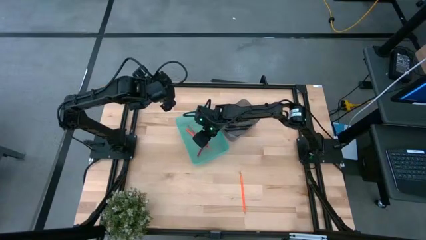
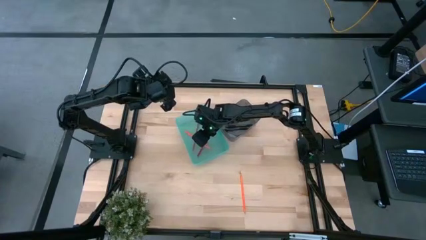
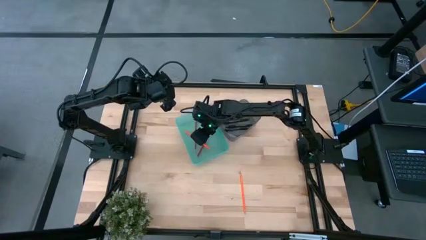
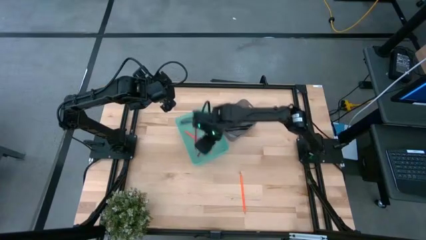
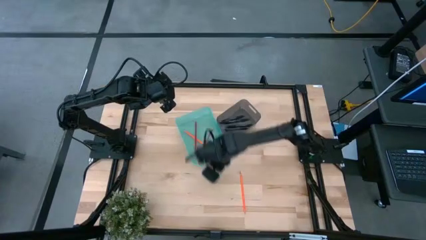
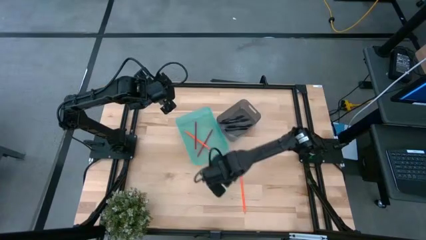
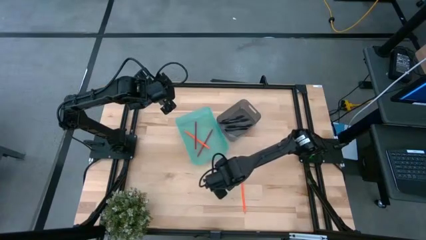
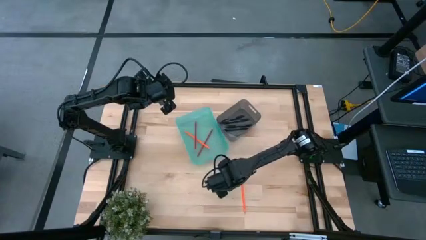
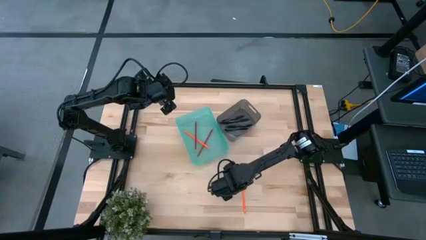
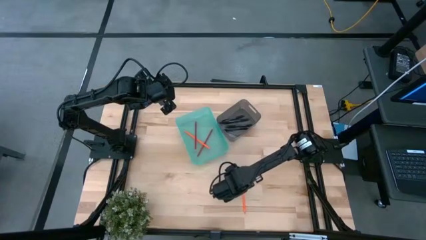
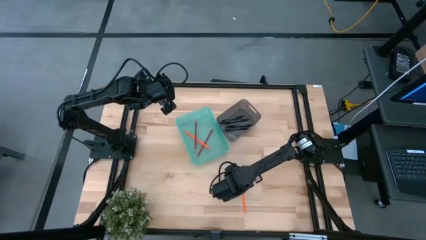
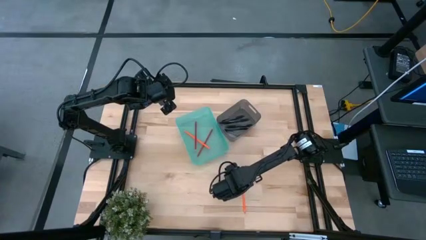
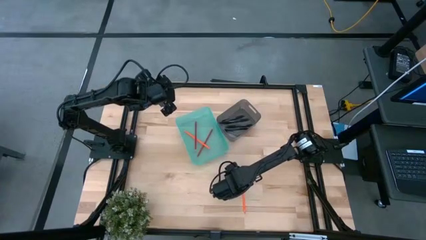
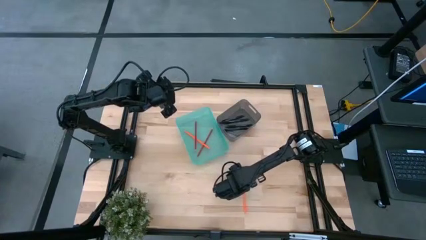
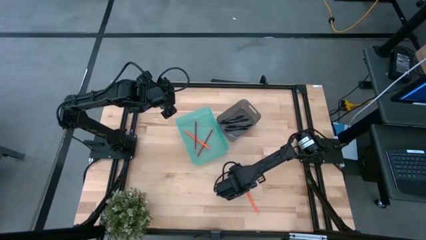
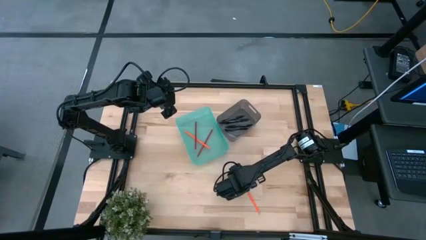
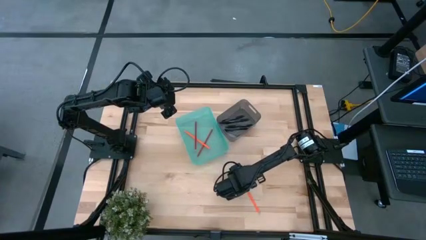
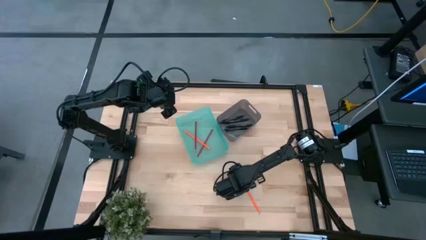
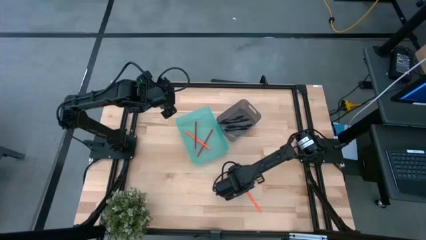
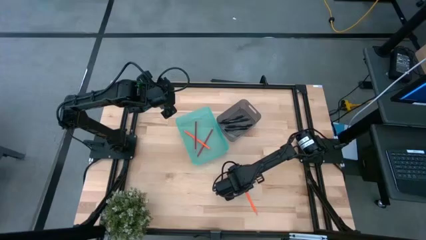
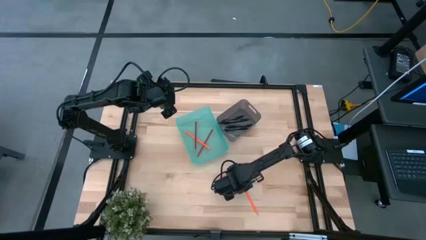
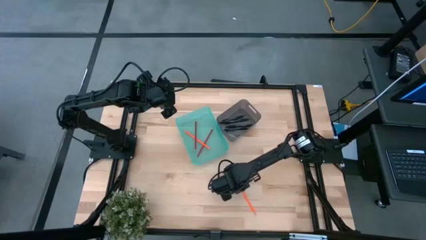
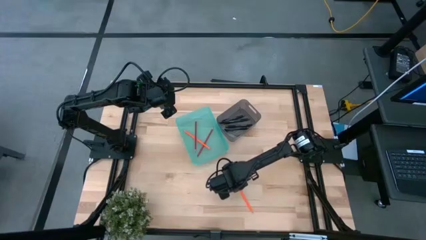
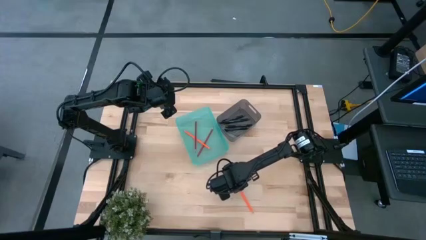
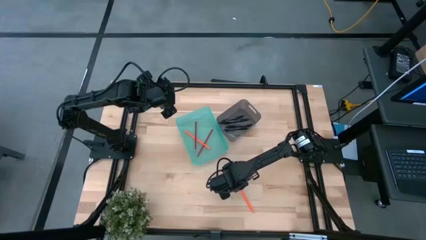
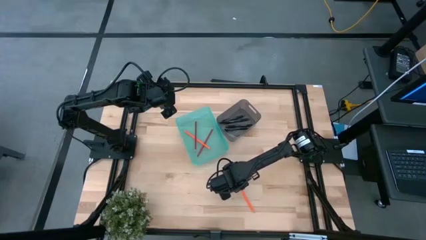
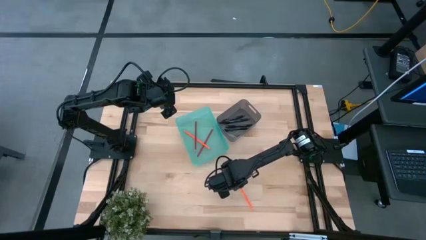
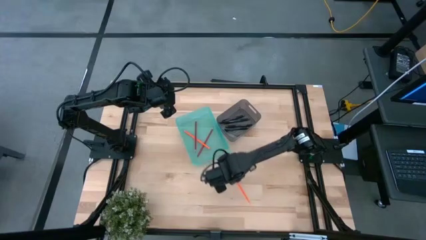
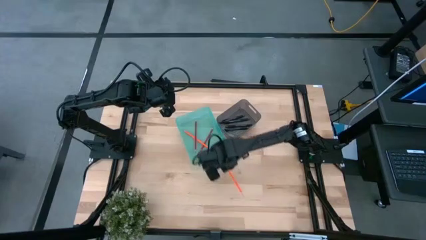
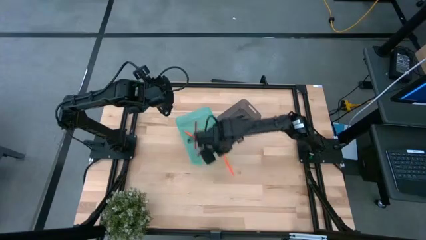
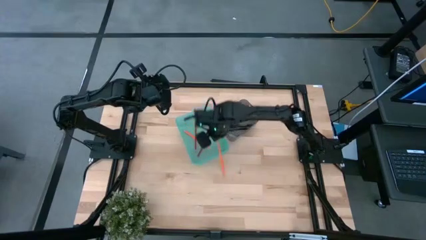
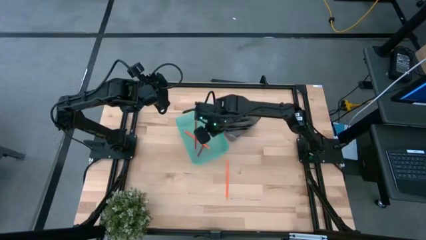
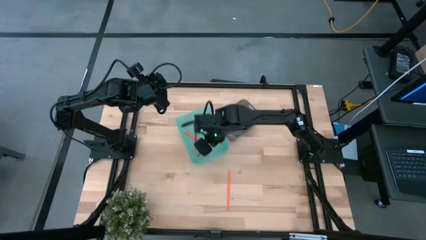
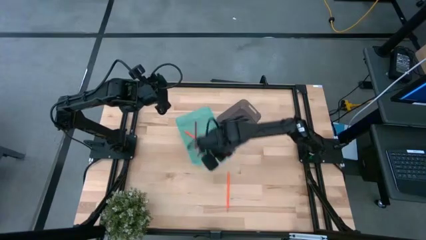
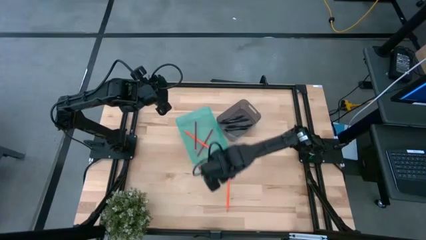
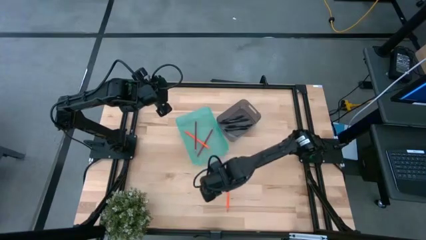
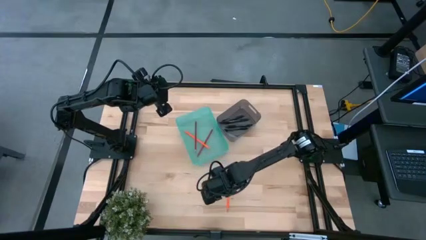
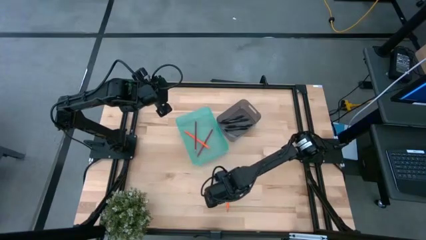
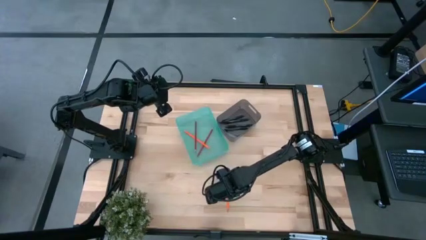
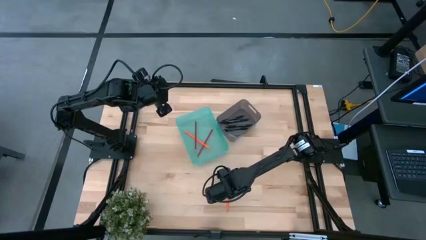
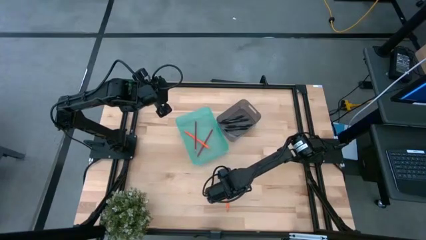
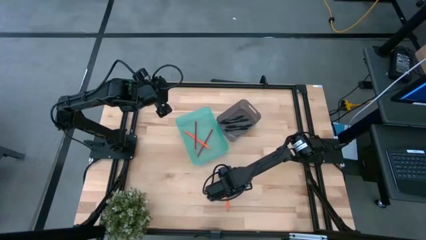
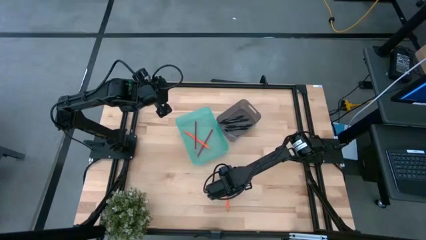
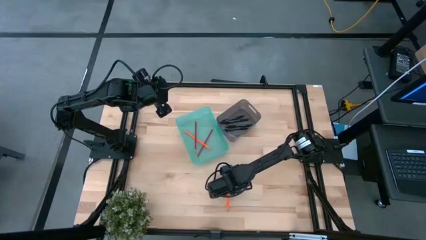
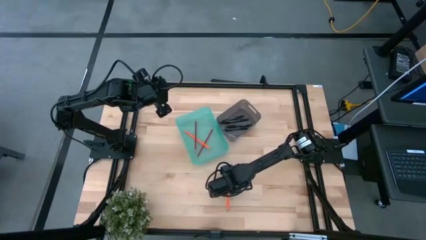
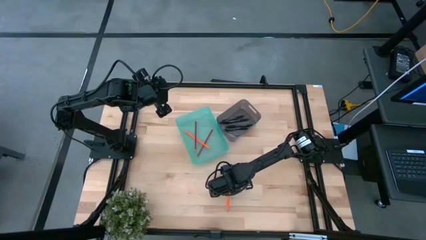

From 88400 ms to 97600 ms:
Task: Sort pens & pencils
Put the orange pencil into the light blue bin

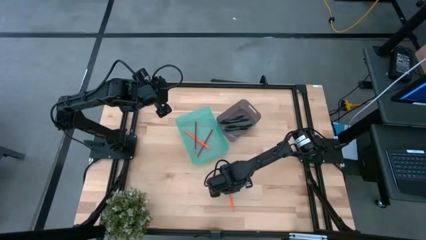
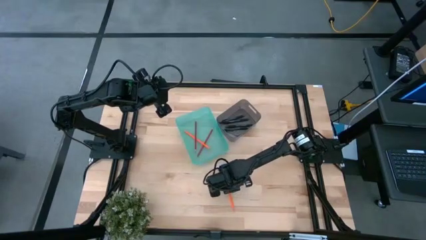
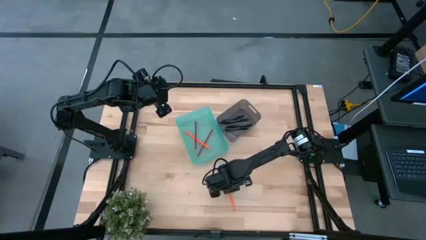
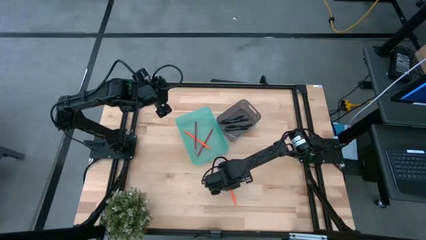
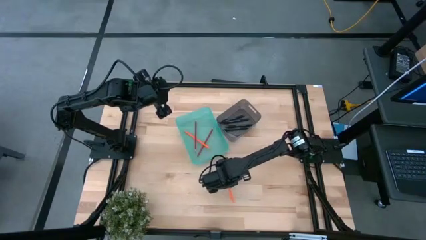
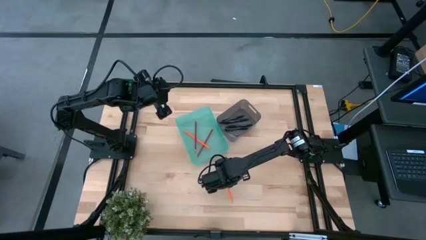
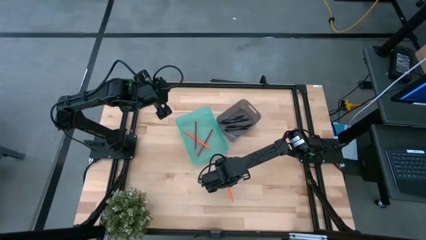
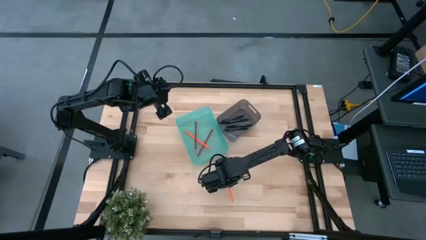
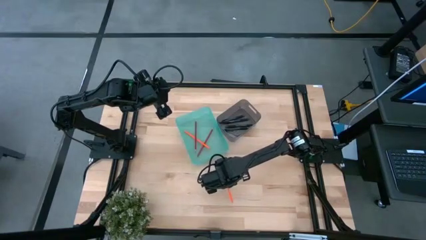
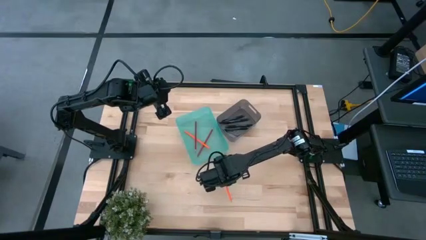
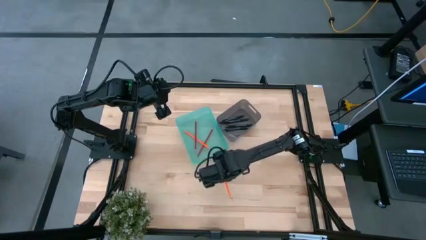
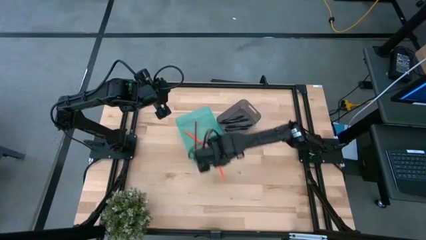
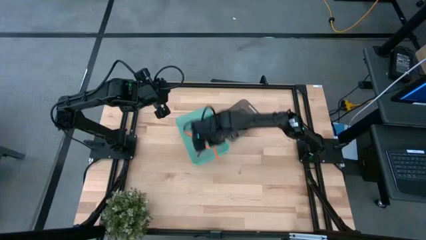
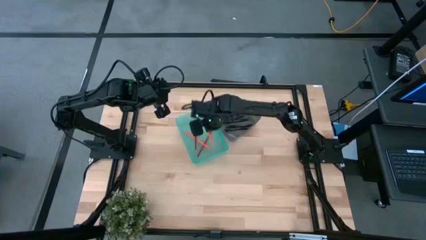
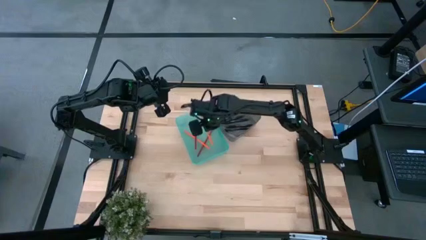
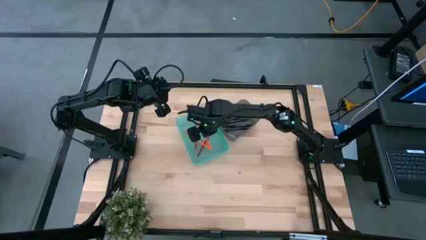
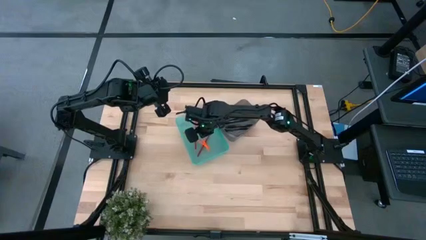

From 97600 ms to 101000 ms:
Put the orange pencil into the light blue bin
